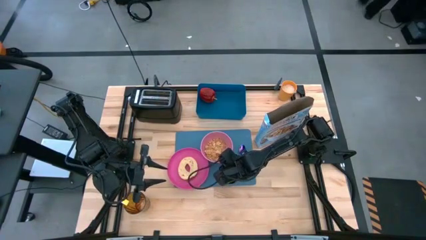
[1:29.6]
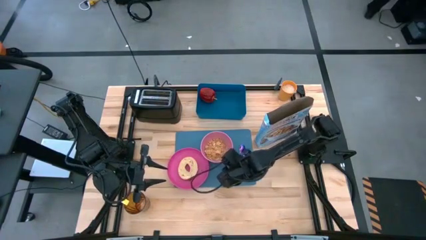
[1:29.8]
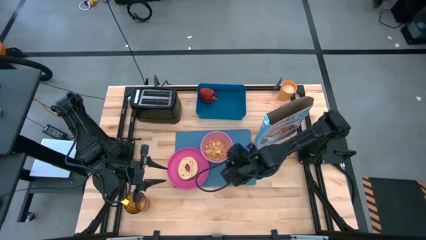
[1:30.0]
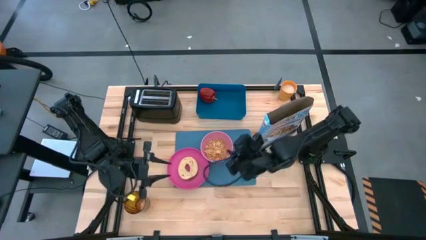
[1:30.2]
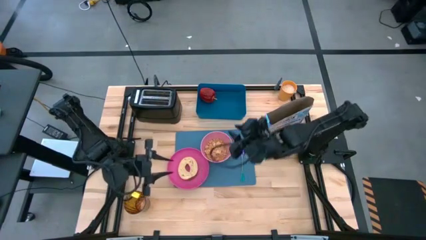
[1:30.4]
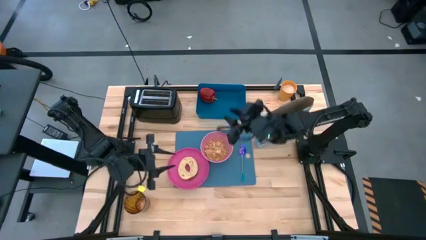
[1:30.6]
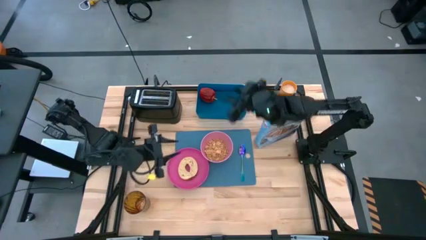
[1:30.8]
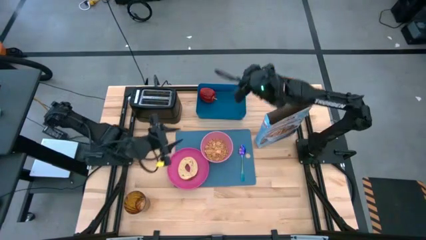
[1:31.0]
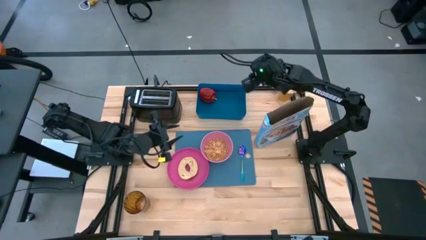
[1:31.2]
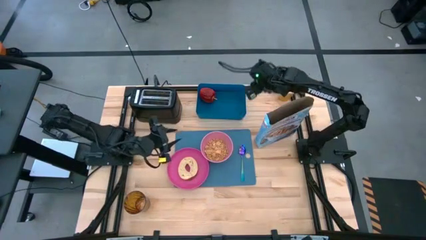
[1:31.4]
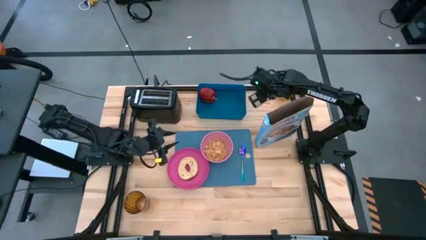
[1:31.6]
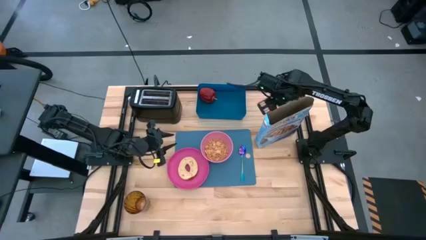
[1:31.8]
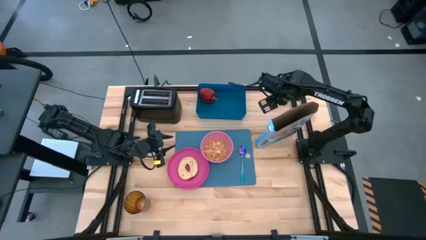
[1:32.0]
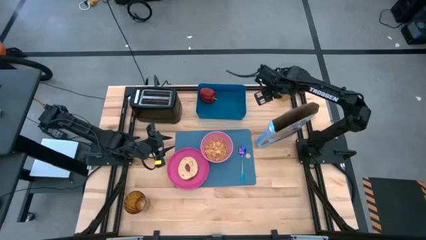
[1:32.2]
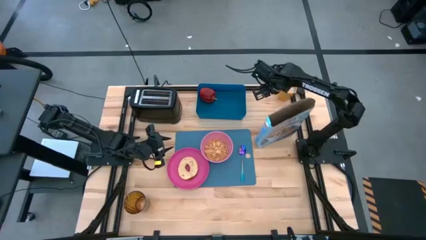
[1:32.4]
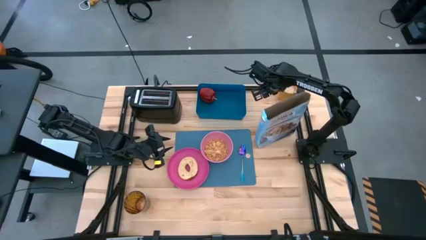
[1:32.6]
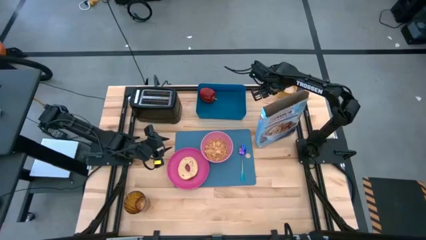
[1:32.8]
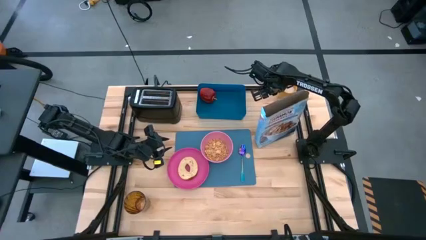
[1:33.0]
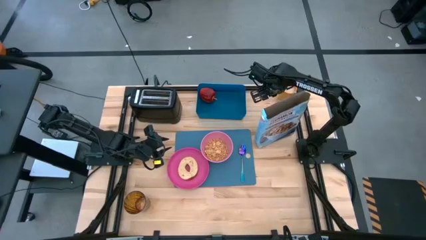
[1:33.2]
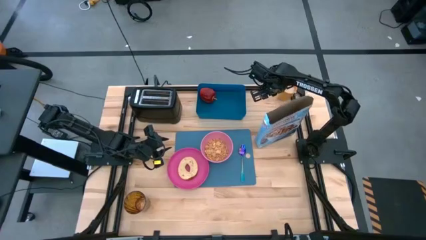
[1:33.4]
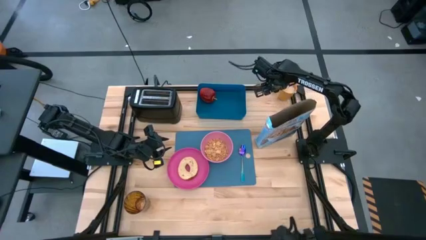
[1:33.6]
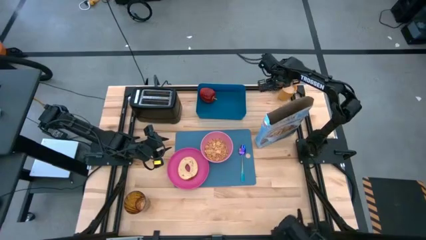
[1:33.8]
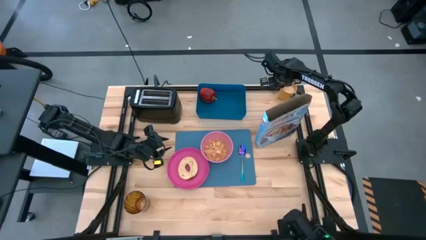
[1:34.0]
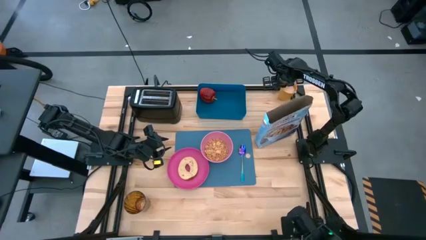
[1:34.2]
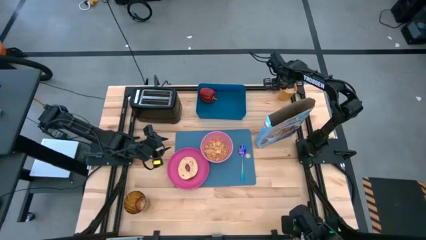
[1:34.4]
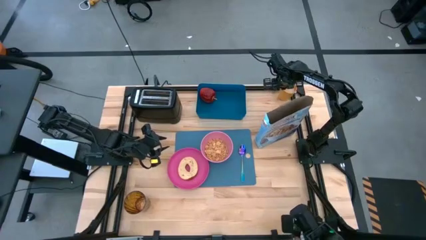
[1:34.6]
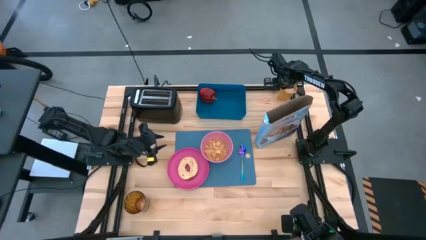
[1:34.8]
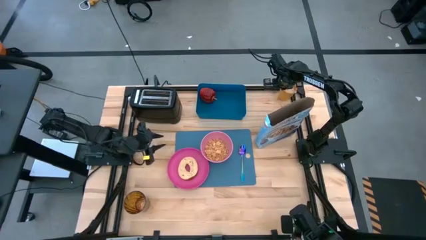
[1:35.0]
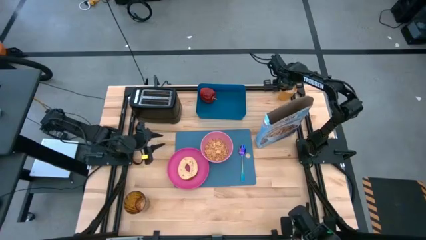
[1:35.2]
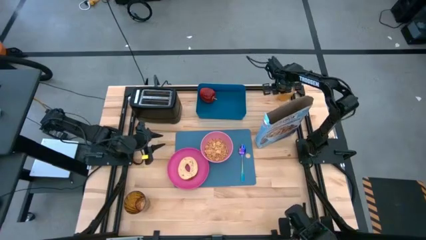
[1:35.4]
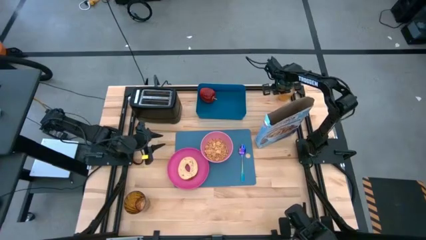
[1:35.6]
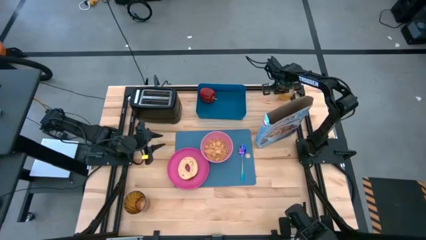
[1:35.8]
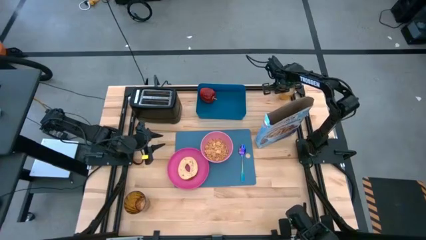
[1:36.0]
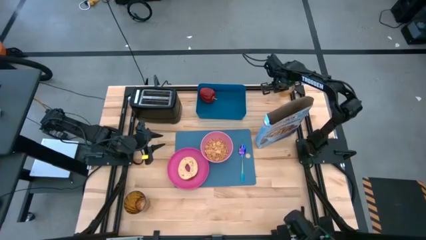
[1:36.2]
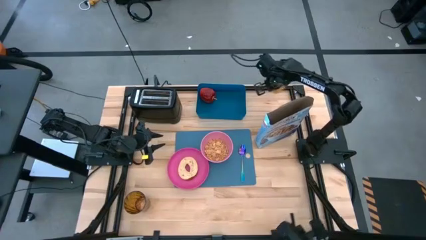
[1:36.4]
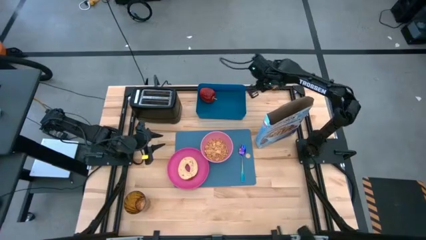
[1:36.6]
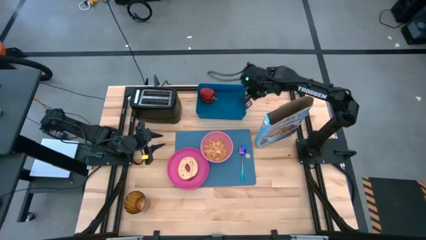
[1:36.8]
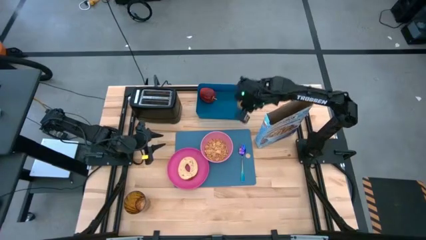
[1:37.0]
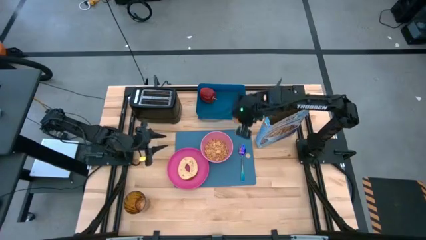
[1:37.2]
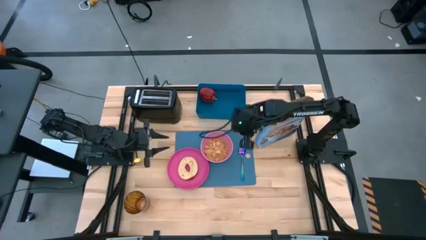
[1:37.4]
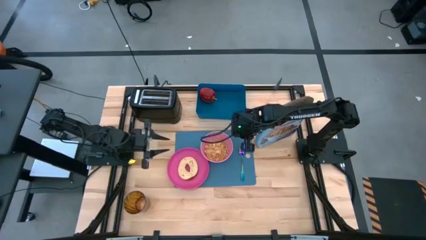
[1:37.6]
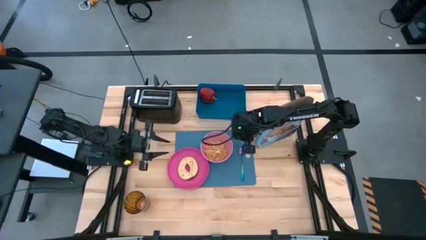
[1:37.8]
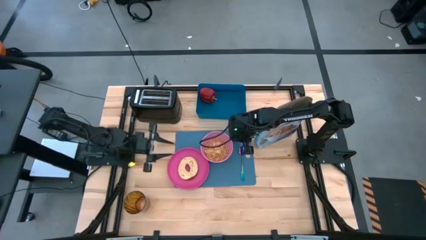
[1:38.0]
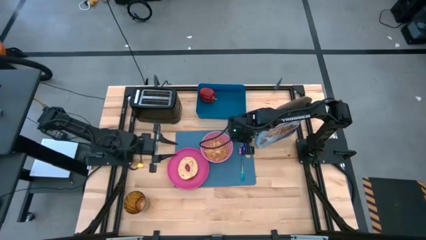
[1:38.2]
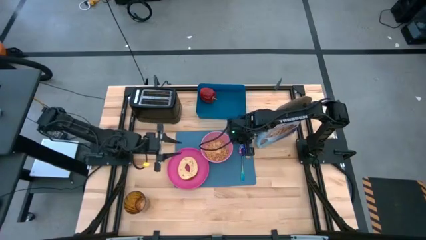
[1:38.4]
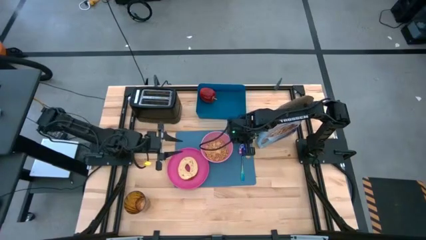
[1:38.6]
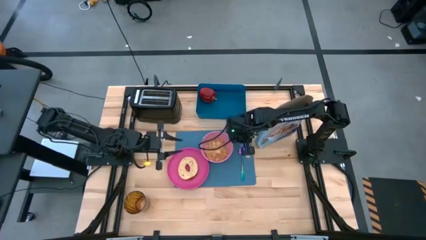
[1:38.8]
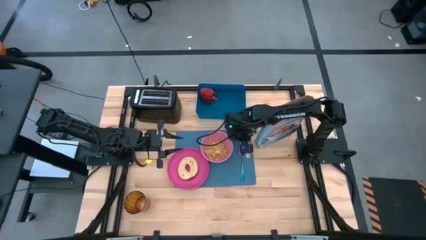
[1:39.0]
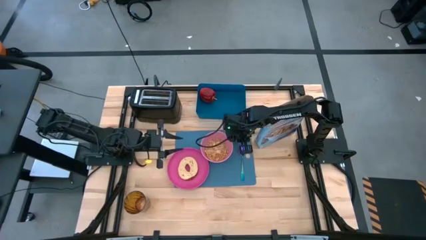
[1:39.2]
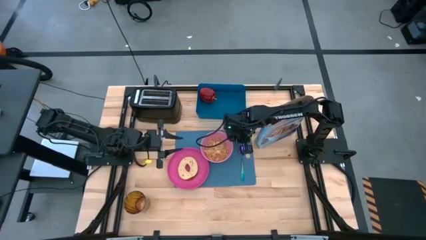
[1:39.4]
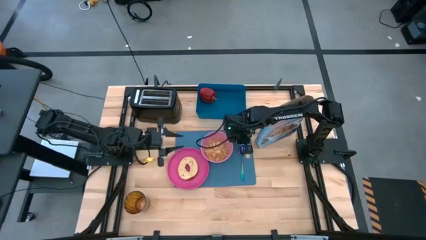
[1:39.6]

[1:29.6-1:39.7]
Task: Arrange a breakfast setting
Put the yellow cup on the blue placemat
